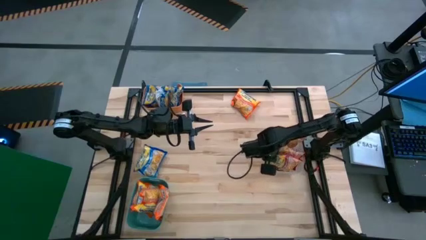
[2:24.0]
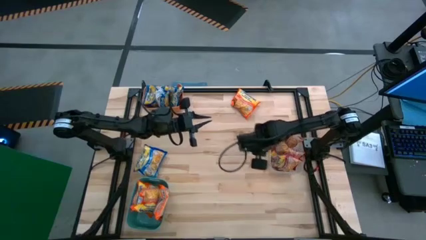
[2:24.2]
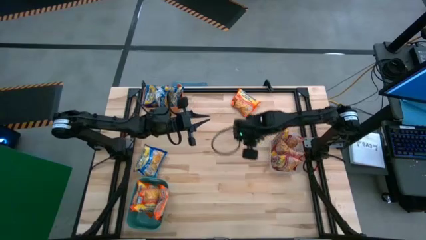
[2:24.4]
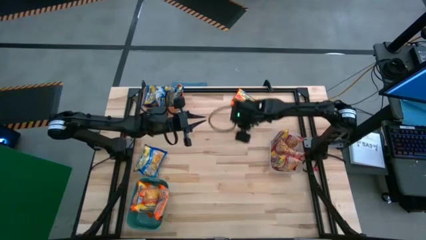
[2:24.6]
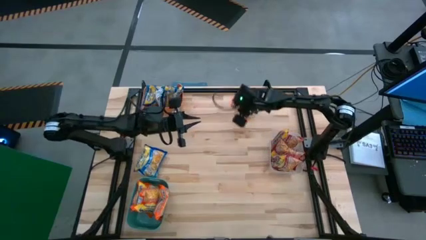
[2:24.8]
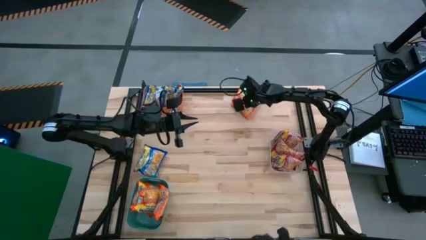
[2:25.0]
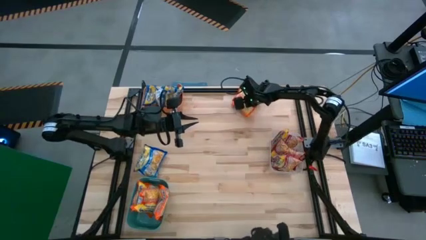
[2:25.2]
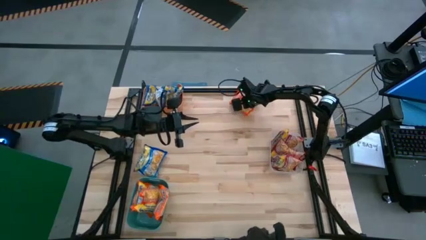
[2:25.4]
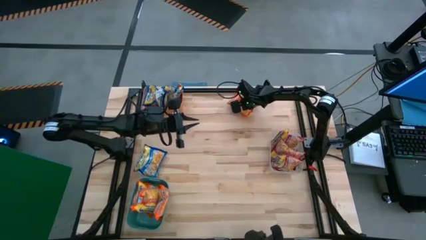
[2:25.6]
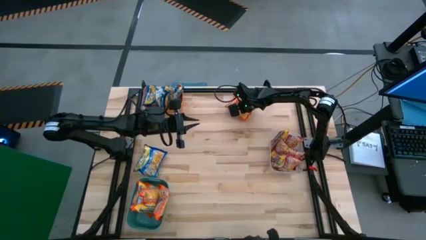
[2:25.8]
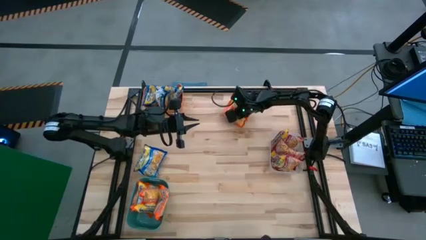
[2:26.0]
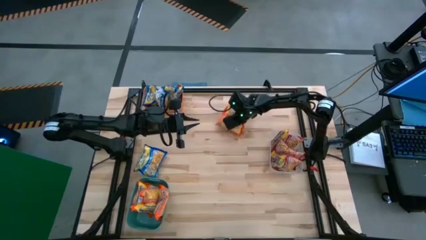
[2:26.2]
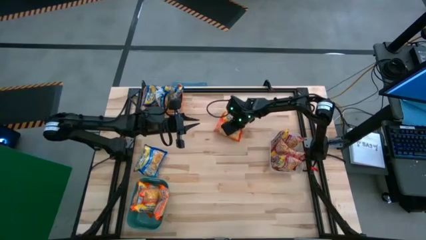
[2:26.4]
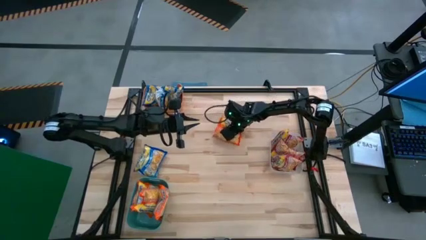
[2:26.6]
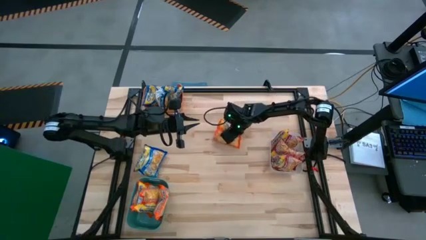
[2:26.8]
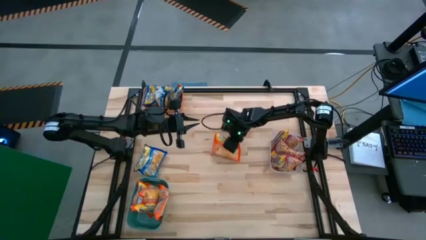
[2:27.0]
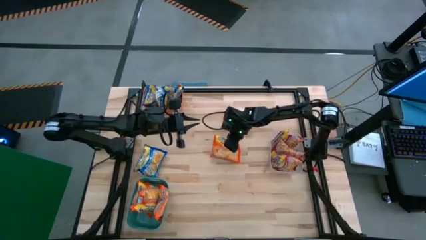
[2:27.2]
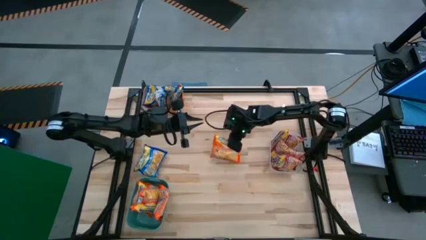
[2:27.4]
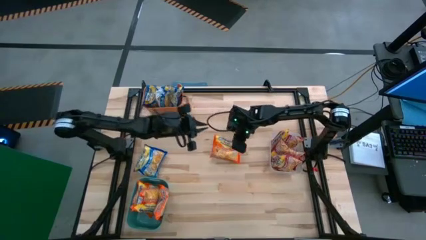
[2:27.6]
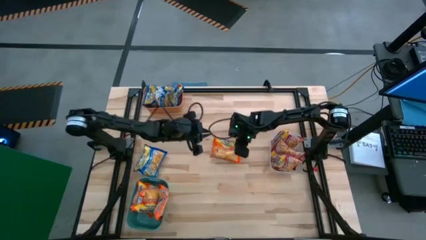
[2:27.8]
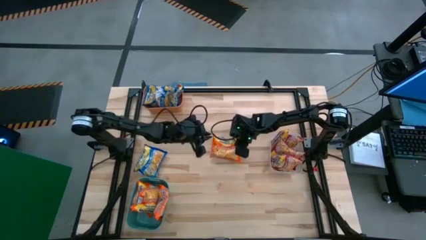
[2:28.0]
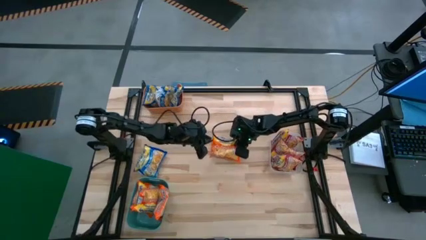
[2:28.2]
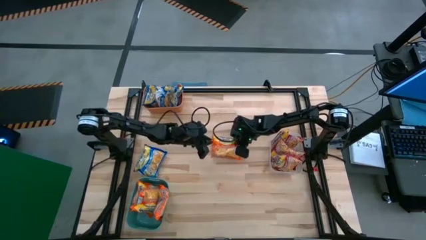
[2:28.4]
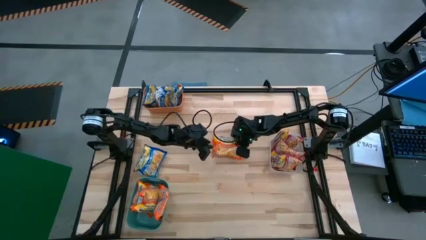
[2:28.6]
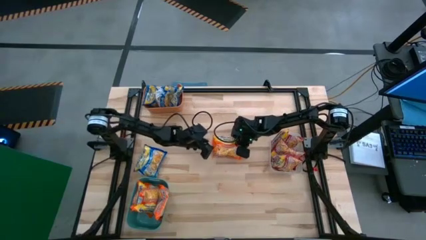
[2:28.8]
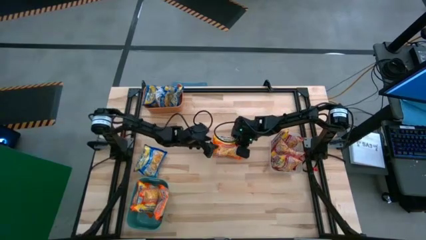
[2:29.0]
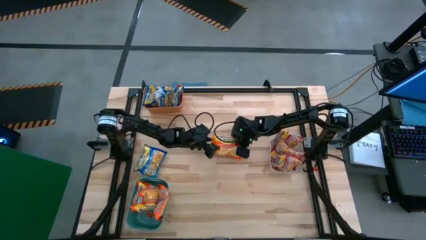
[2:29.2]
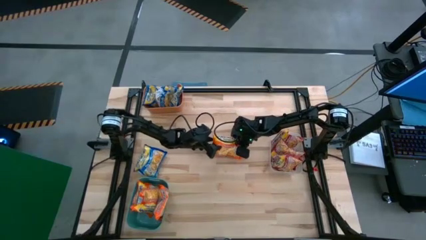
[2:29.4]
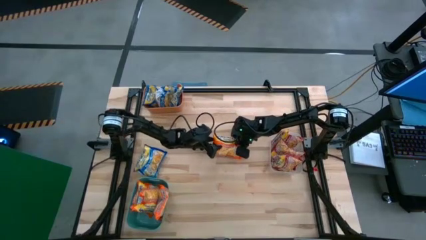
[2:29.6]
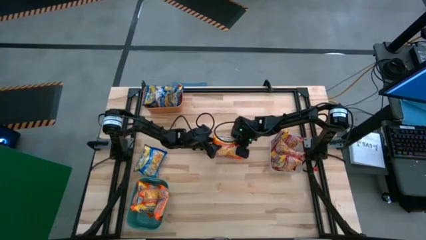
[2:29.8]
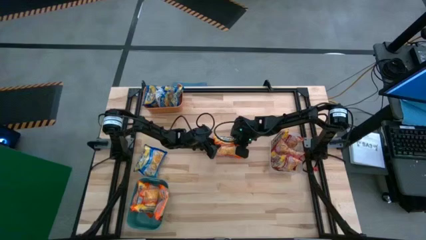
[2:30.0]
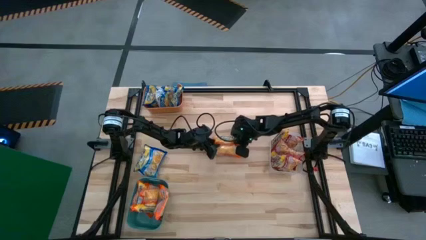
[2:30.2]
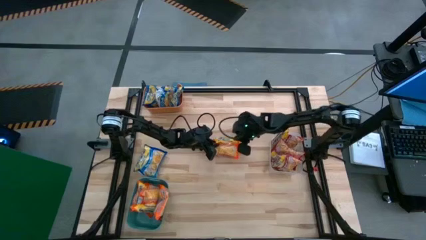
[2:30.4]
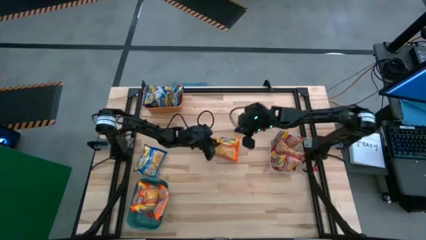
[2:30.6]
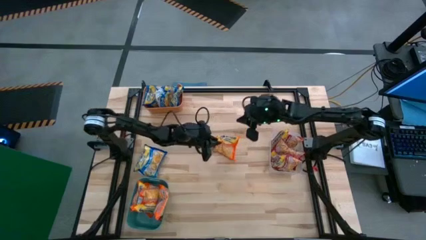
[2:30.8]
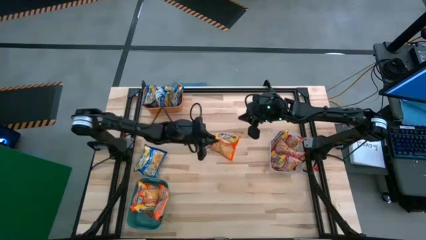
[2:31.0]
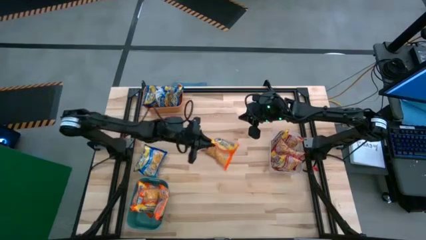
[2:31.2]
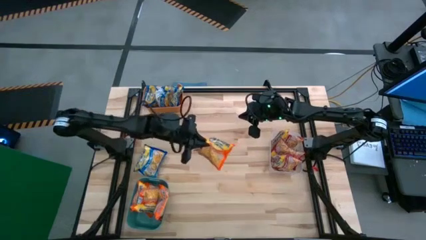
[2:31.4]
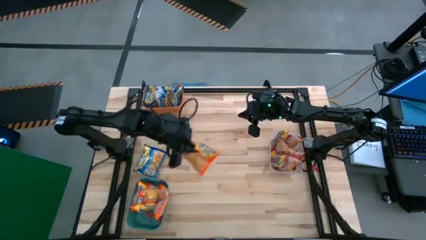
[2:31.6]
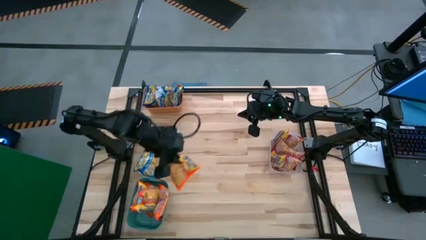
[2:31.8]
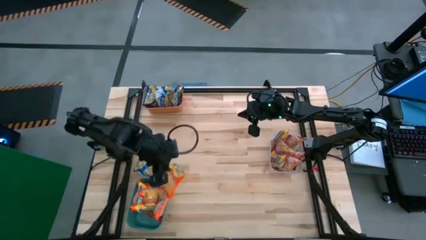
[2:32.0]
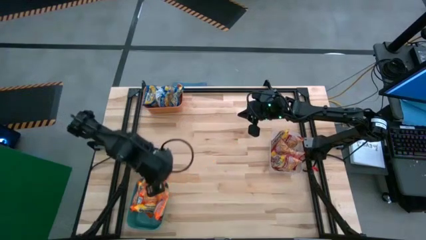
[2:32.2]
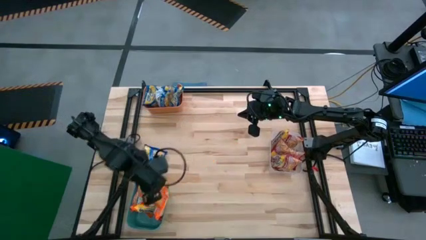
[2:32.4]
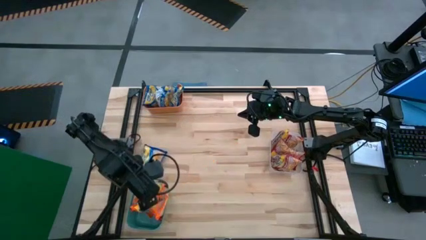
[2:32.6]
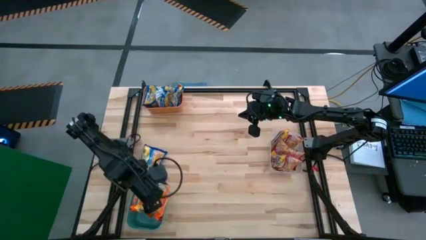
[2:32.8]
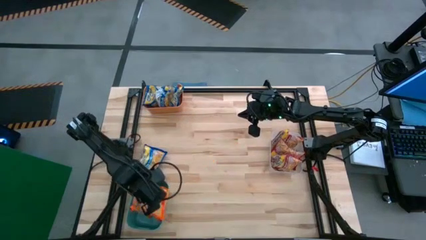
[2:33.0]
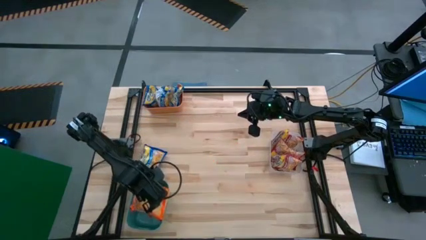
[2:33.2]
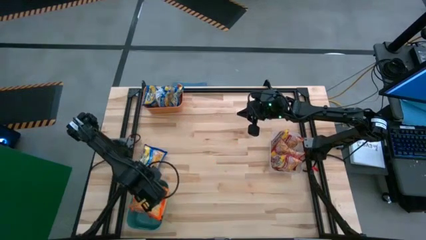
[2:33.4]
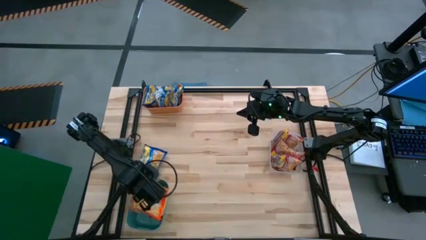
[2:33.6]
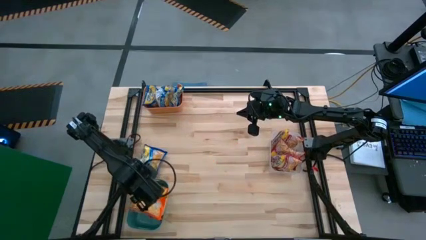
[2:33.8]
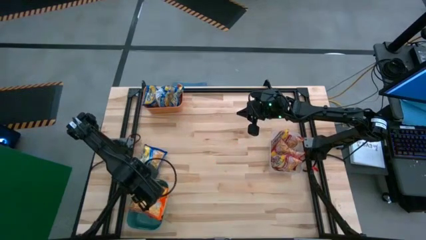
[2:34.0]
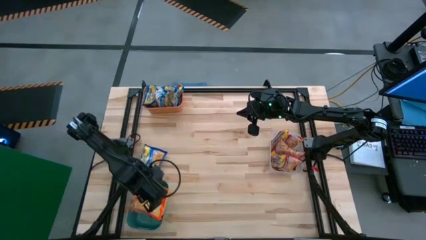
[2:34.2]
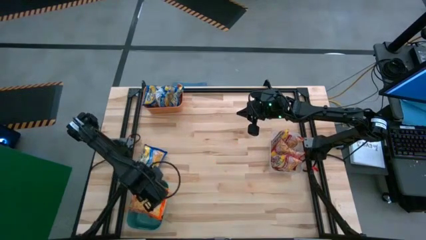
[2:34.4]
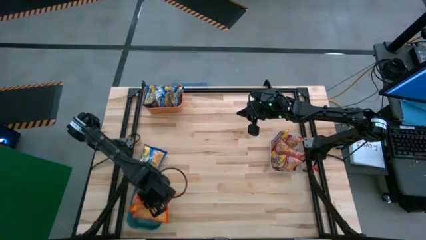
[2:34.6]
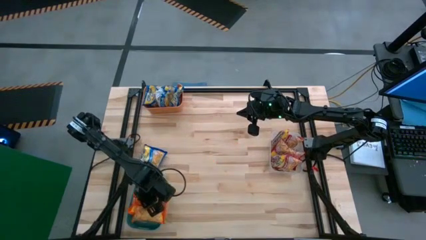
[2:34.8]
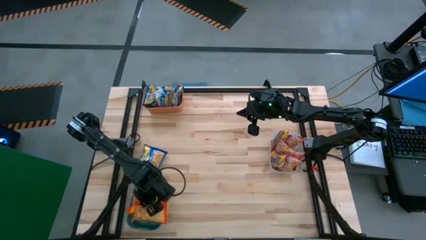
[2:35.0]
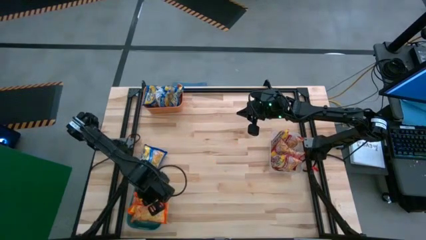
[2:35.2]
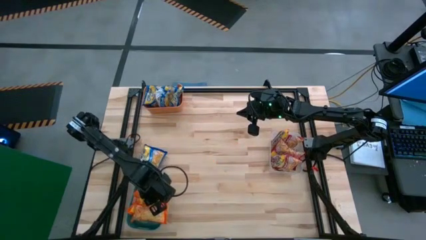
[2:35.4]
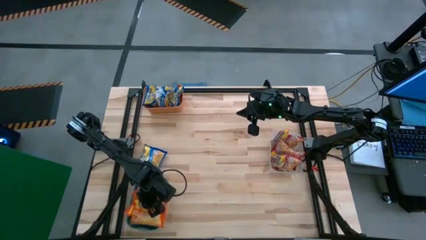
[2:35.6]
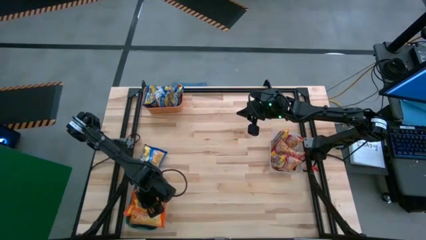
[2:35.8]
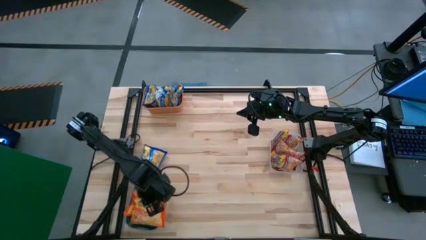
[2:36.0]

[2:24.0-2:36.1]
Task: Sort Maruchan noodles
Put the orange noodle pack into the green bin

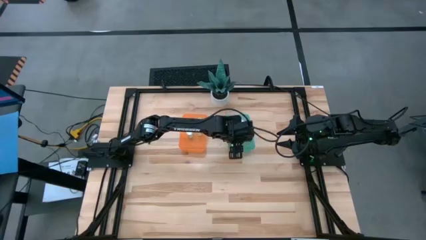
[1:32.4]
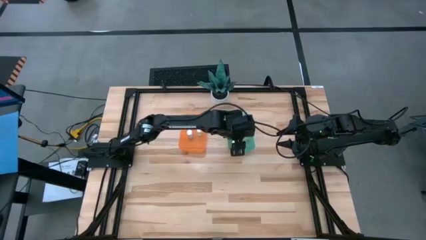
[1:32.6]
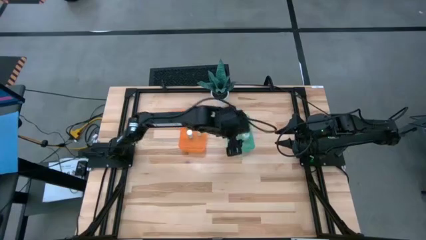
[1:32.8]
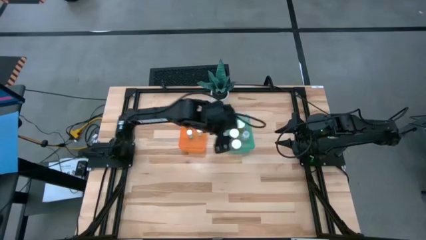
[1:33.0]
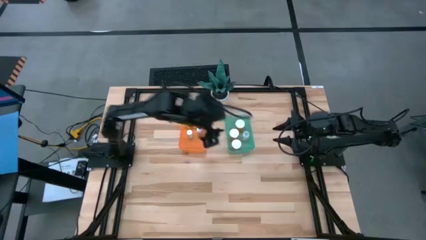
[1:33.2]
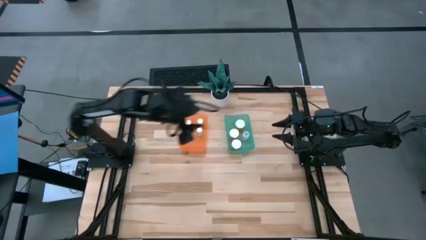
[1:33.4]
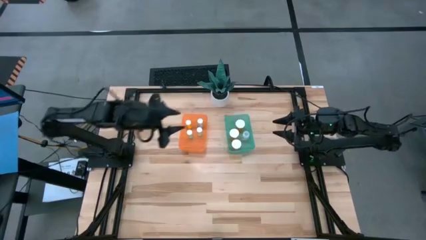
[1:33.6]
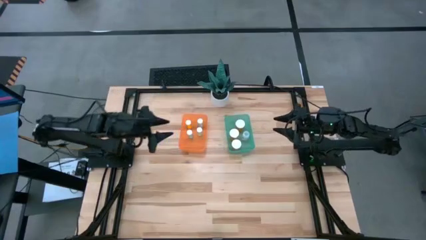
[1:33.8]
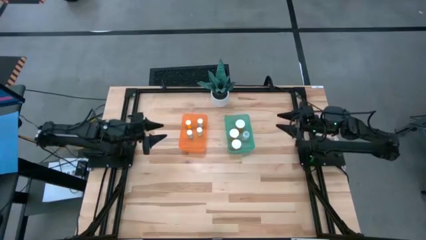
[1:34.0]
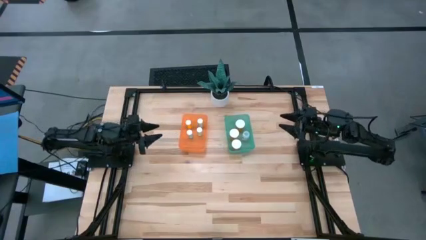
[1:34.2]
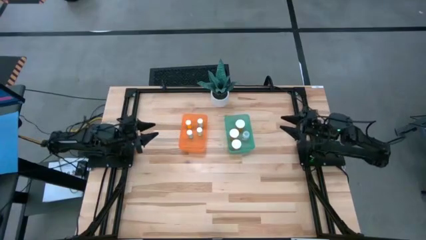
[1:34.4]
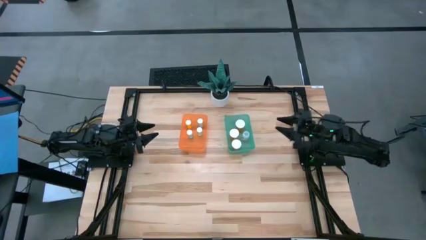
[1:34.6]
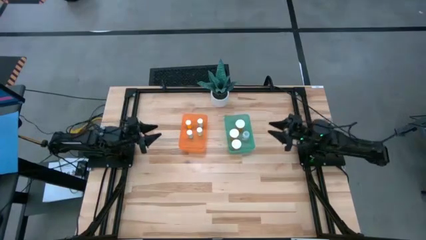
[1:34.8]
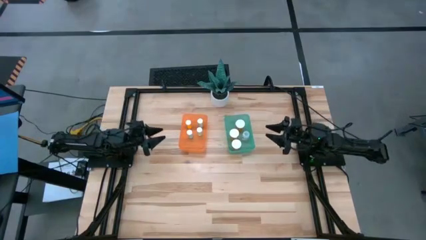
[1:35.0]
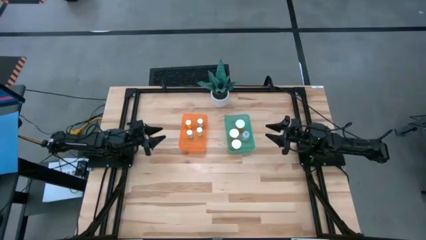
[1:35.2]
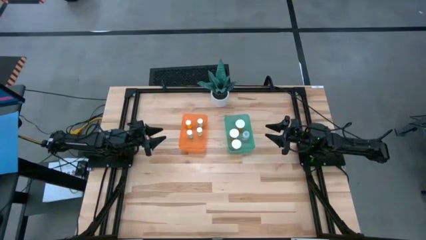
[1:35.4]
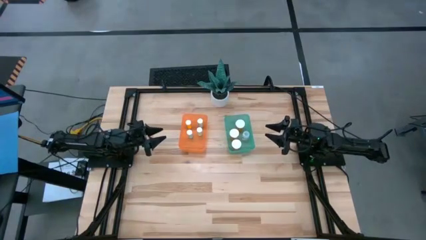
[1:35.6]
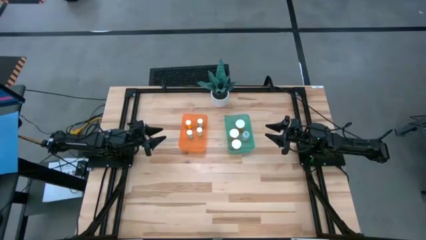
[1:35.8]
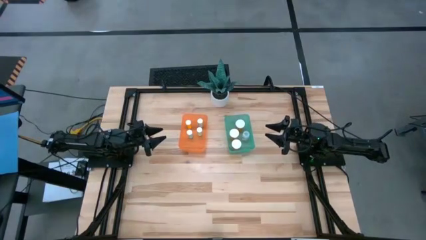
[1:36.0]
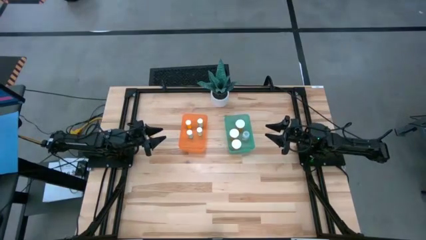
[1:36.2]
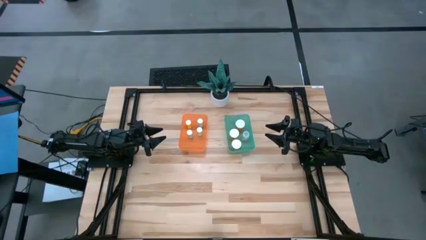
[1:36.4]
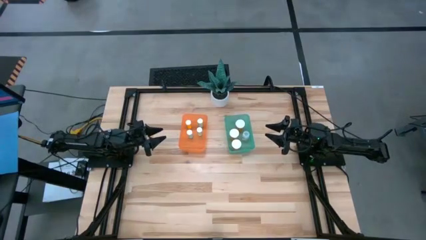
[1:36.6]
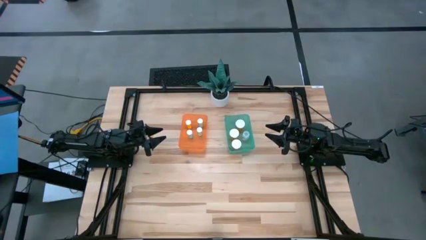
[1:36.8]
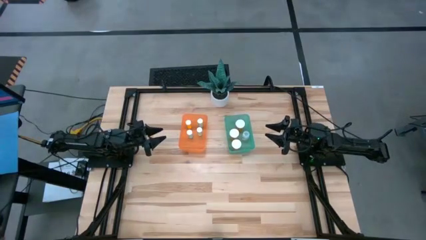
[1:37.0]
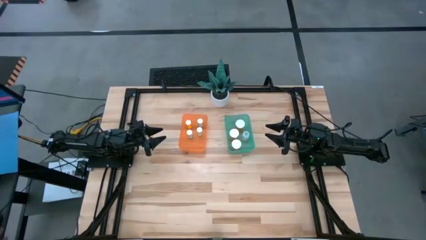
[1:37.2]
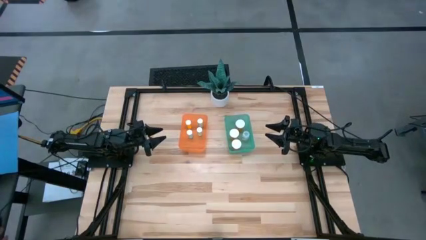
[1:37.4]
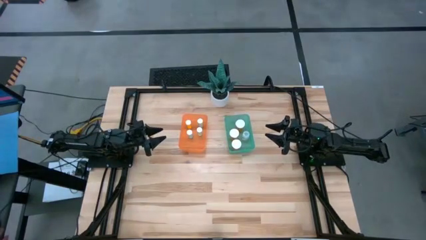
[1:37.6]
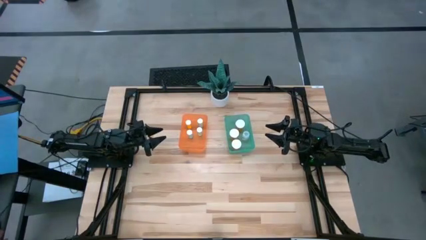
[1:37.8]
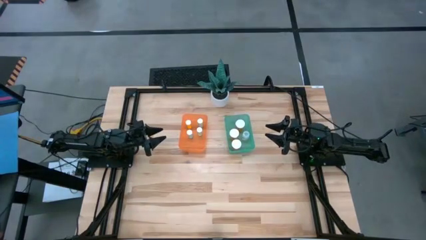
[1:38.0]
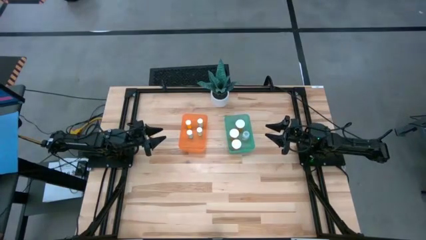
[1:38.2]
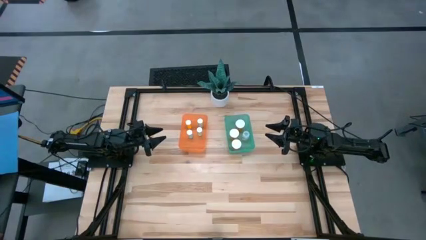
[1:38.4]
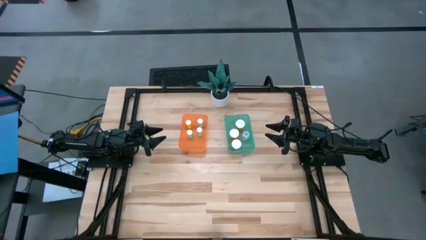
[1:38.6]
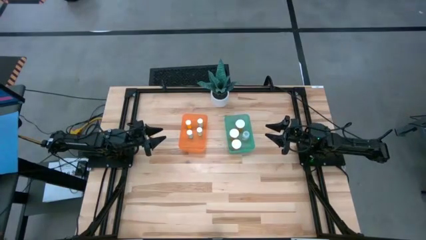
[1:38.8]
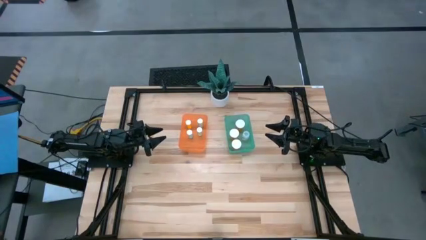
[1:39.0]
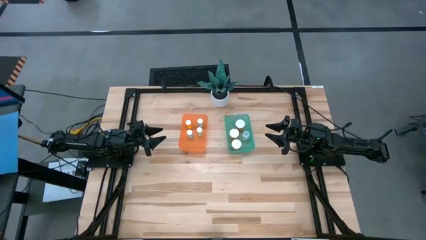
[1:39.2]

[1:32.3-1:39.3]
Task: Pick and place medicine bottles into bin by pill shape (circle, oval)
Return to Home Position
